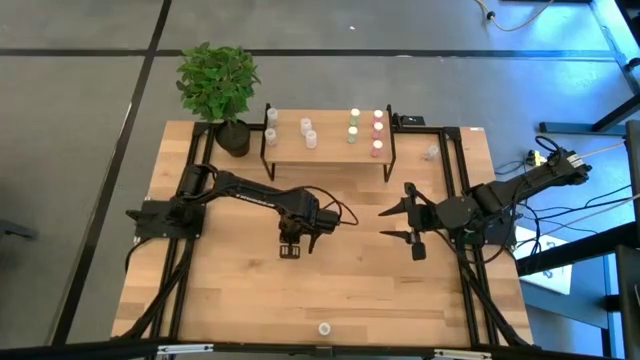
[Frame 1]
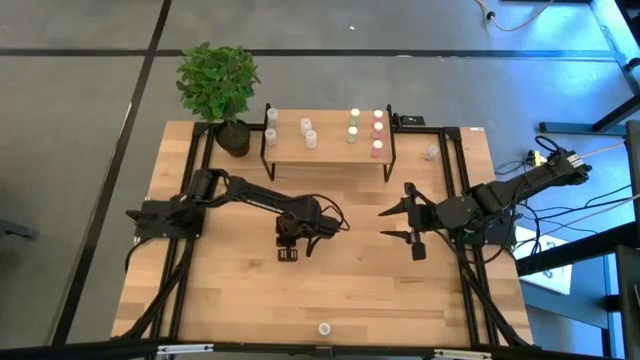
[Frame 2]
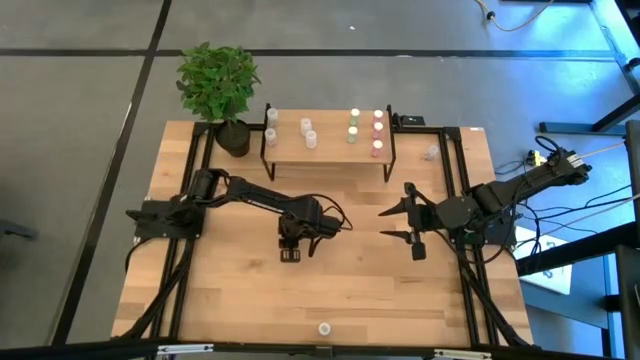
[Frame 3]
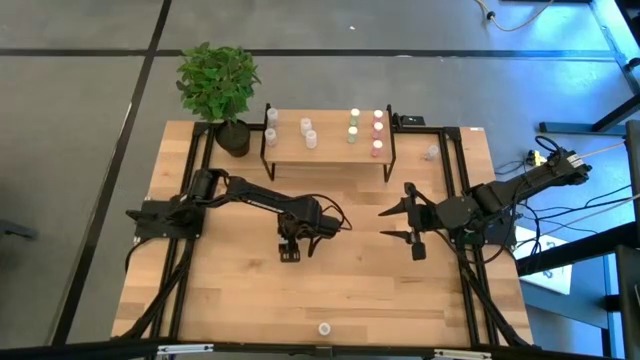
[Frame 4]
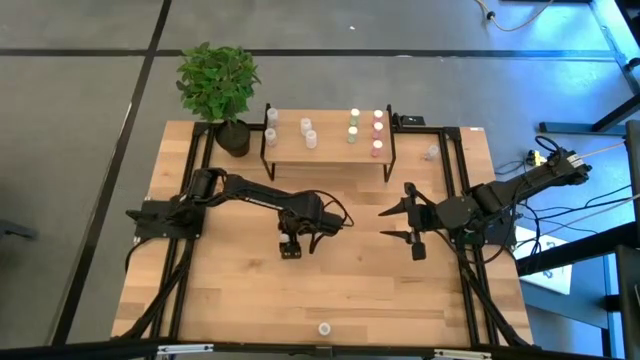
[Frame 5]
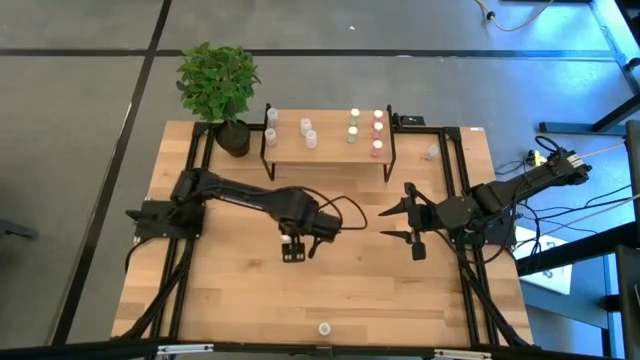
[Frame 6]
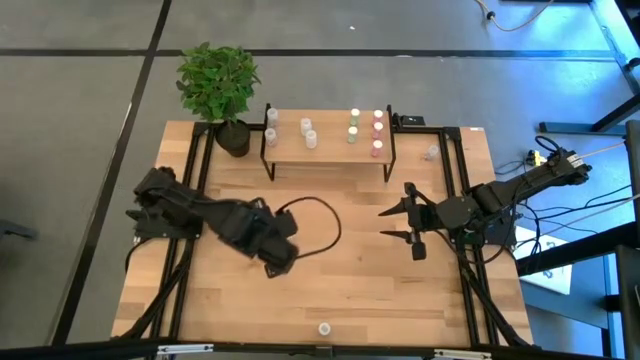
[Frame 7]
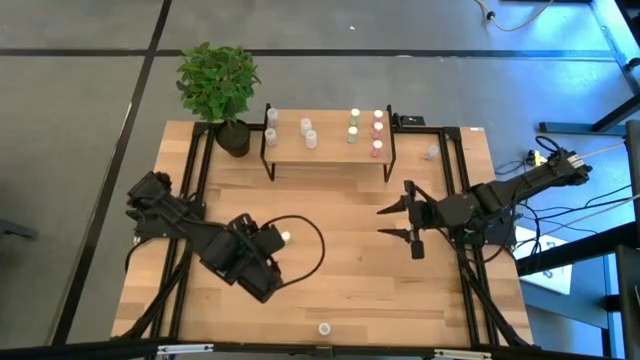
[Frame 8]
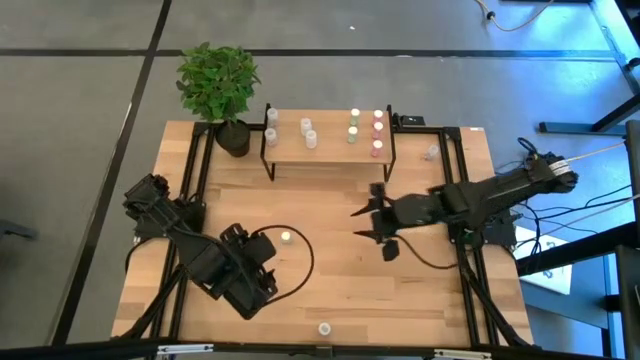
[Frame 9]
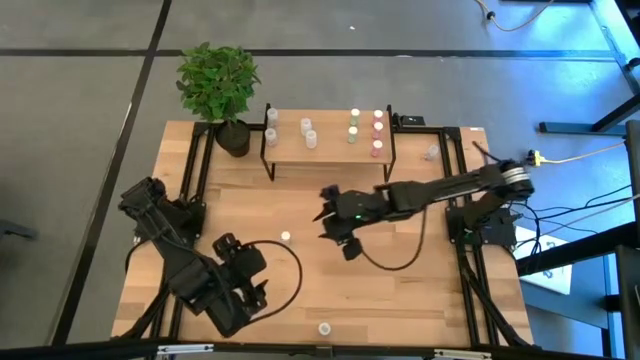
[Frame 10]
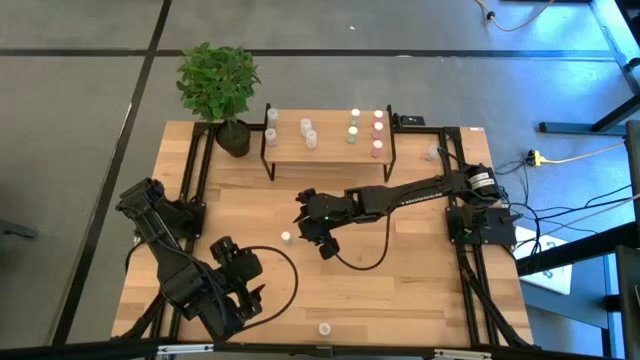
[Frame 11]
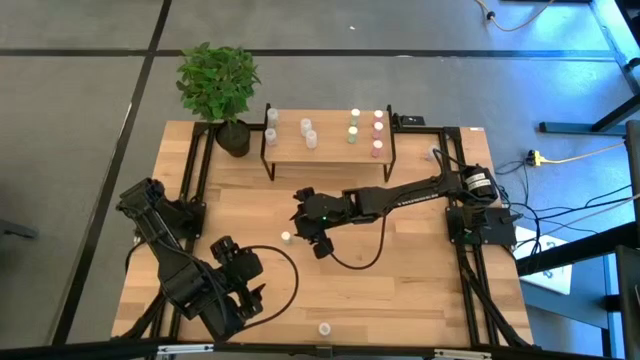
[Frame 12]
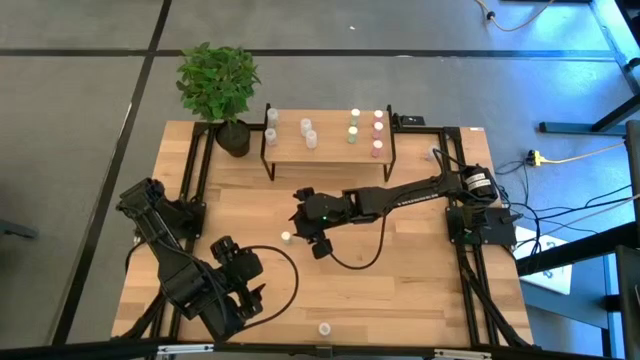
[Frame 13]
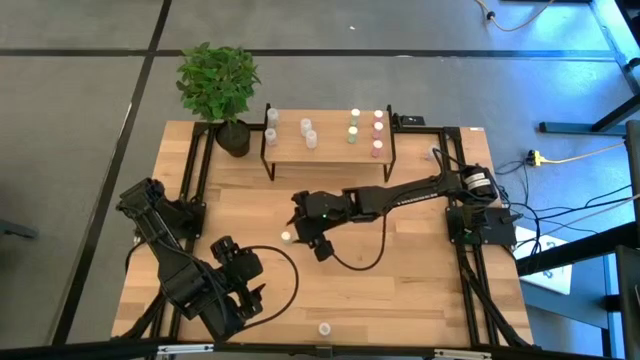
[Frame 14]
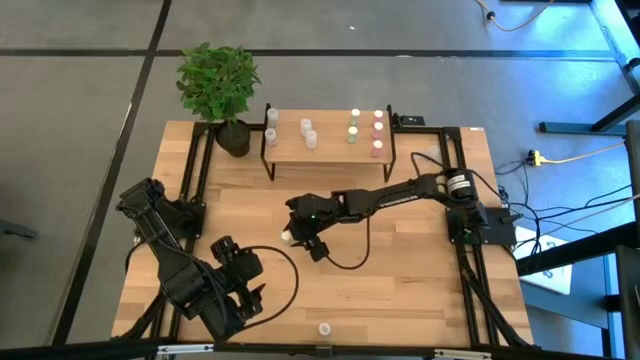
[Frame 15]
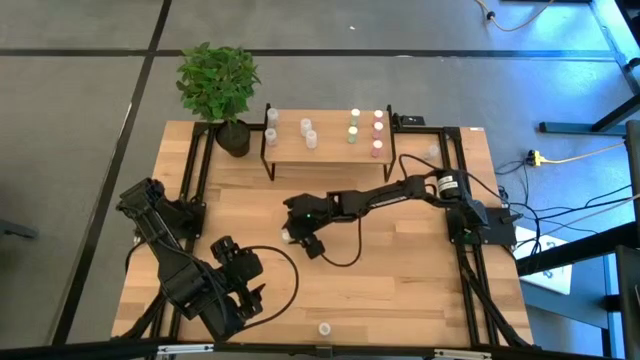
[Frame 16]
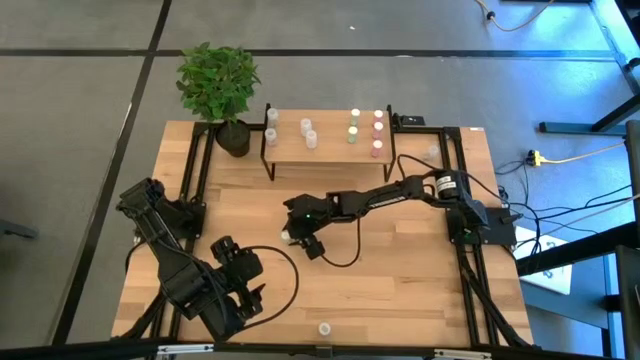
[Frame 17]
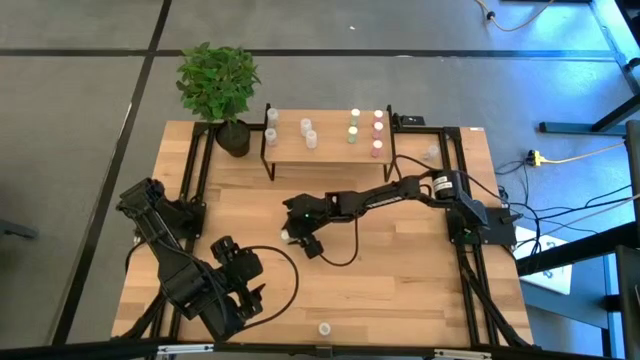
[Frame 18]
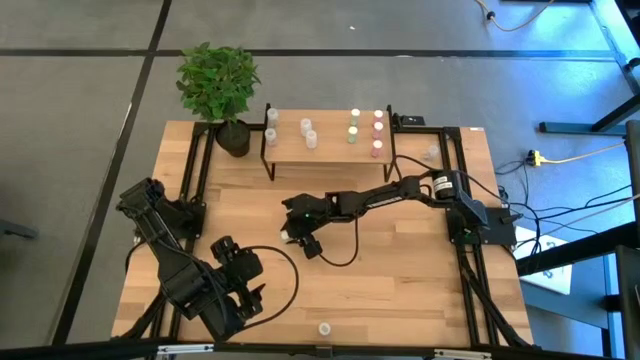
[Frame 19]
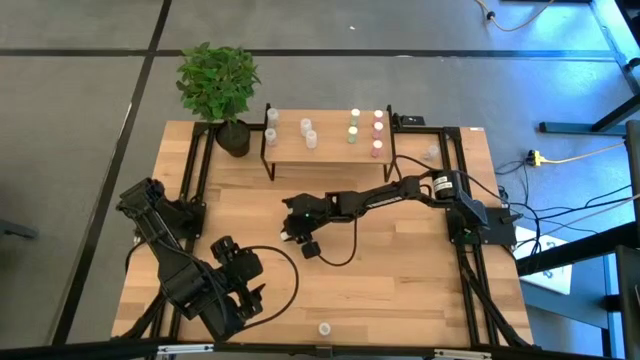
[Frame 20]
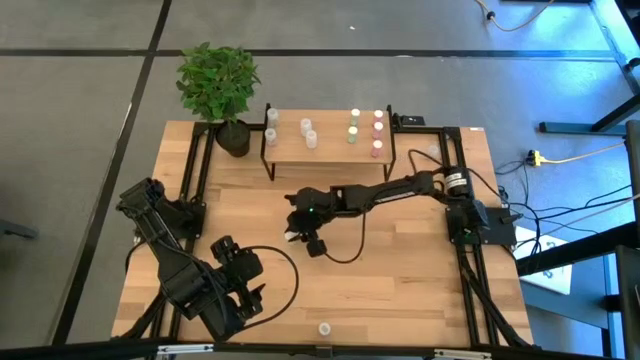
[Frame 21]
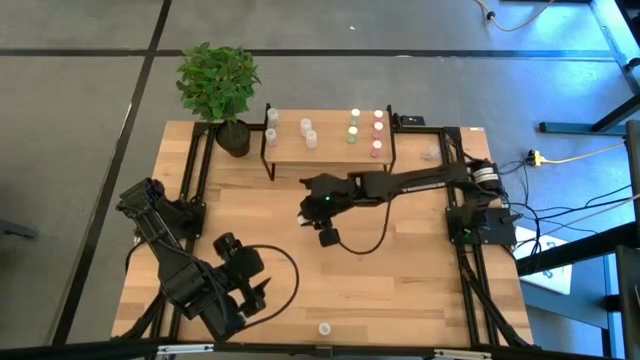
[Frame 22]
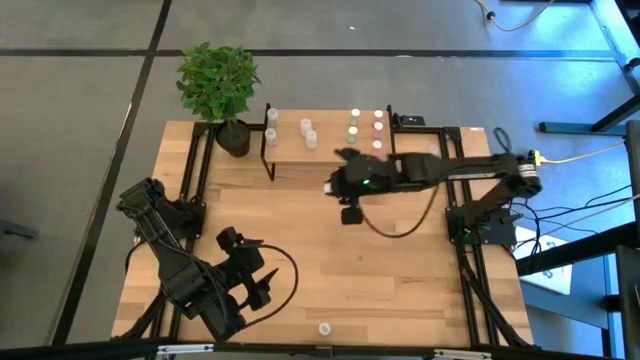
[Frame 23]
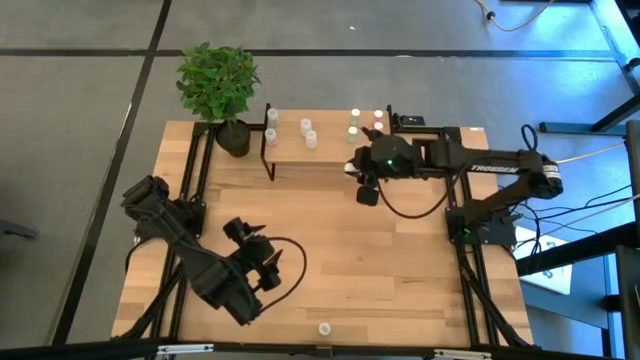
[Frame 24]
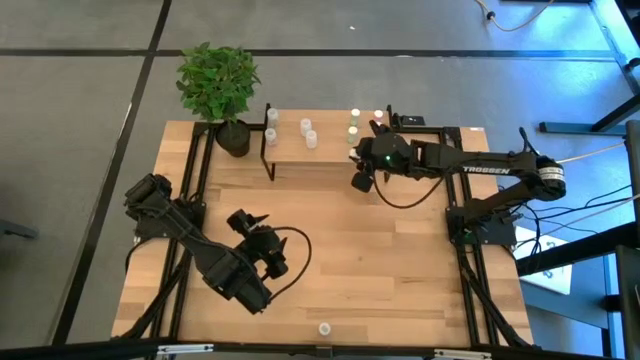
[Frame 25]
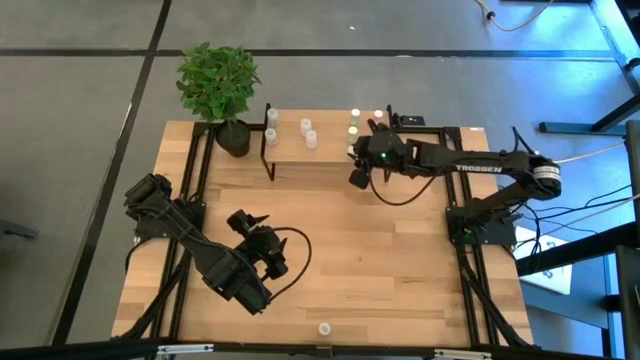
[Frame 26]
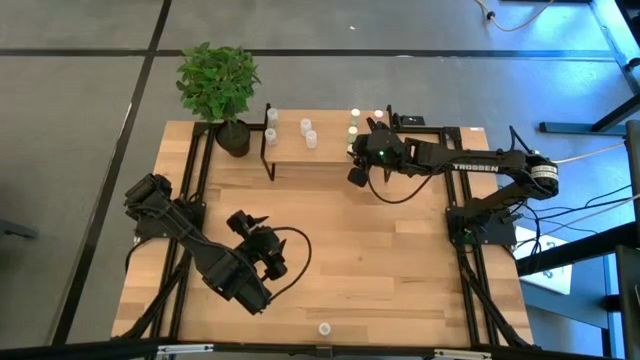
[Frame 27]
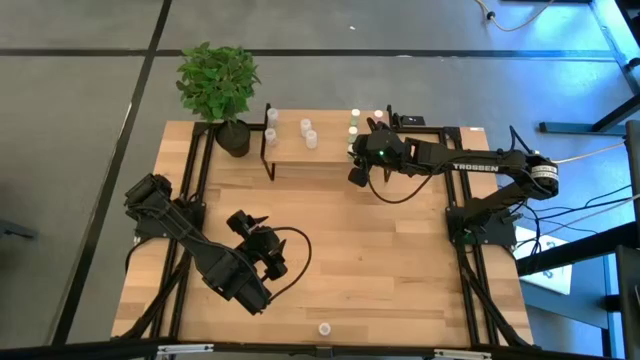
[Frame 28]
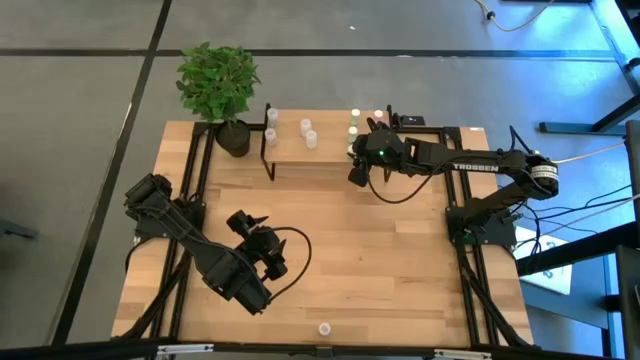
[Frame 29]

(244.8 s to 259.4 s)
Task: Pick and place medicine bottles onto shelf by color
Put the green pill bottle on the shelf aligned with the other green pill bottles

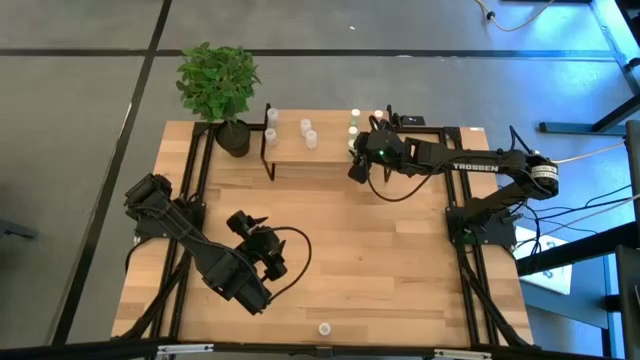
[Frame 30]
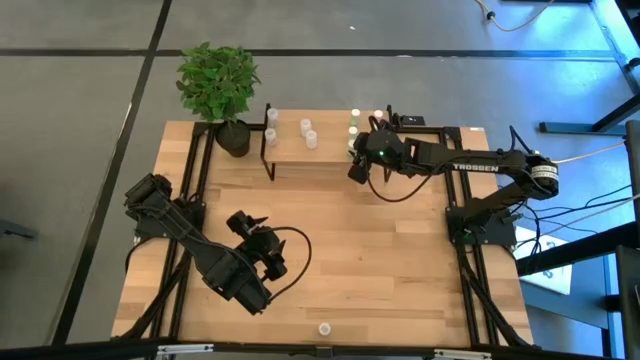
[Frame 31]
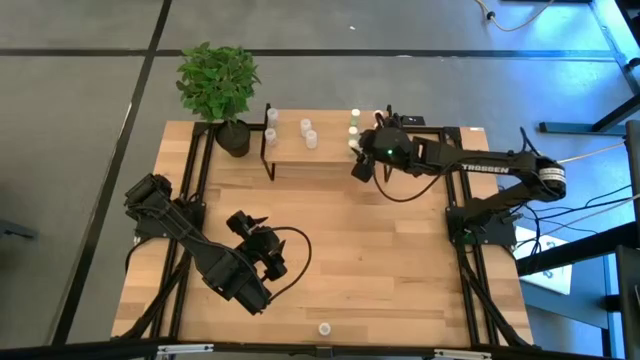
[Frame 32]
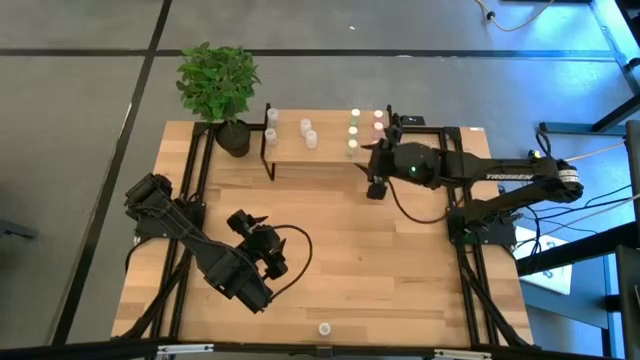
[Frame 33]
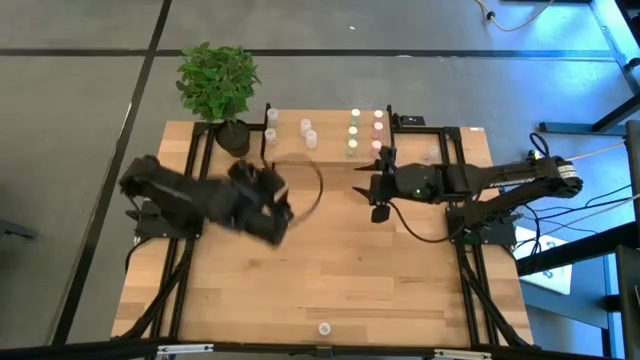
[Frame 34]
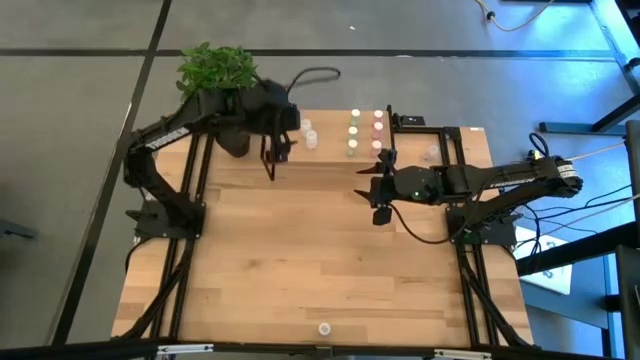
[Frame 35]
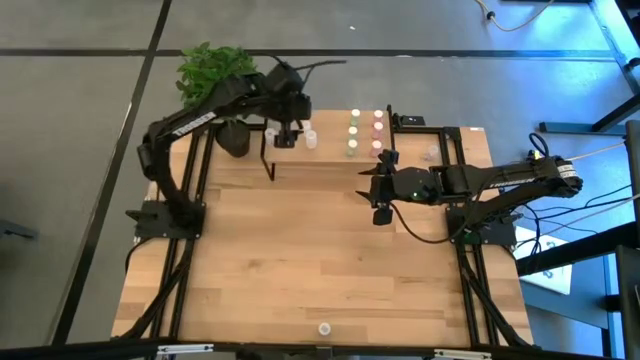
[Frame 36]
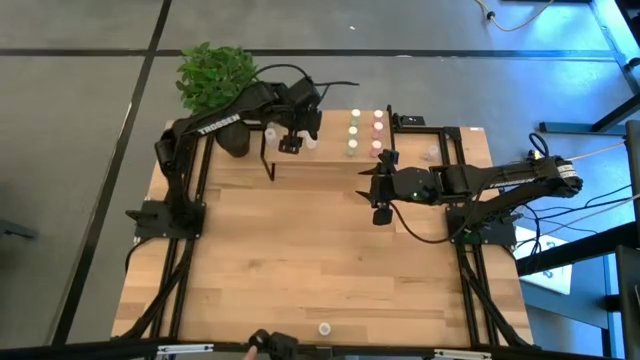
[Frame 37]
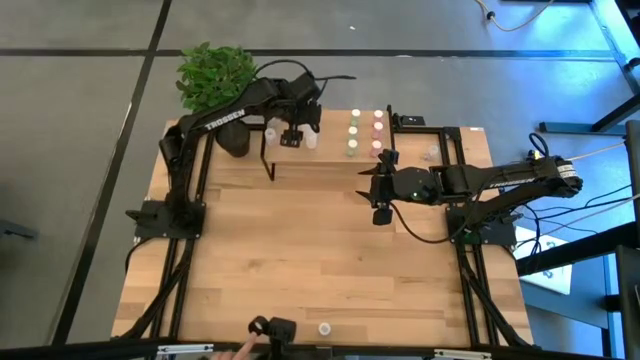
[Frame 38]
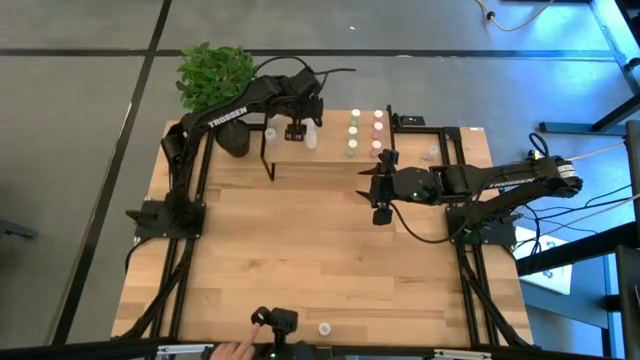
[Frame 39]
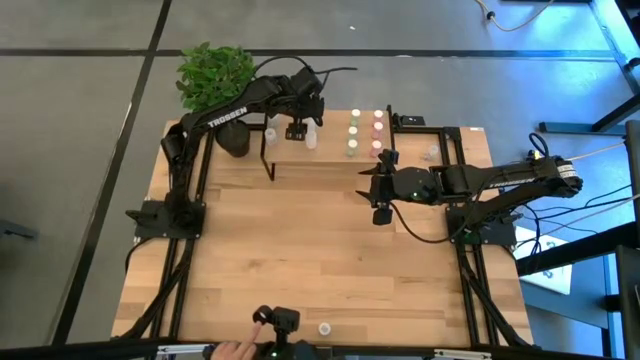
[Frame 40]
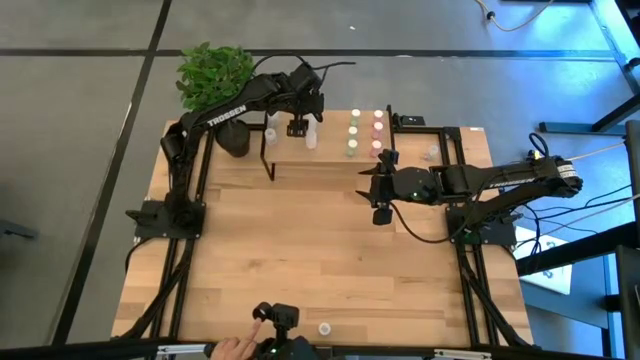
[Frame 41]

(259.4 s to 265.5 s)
Adjust the white pill bottle on the shelf
